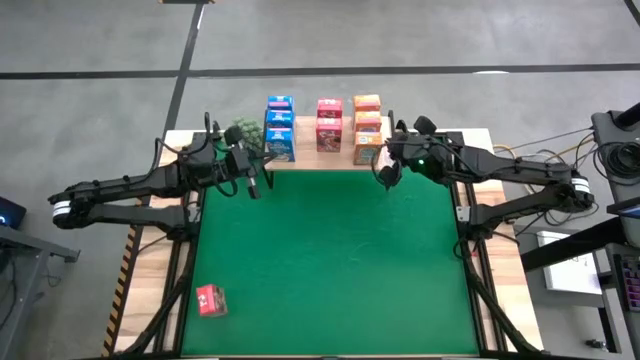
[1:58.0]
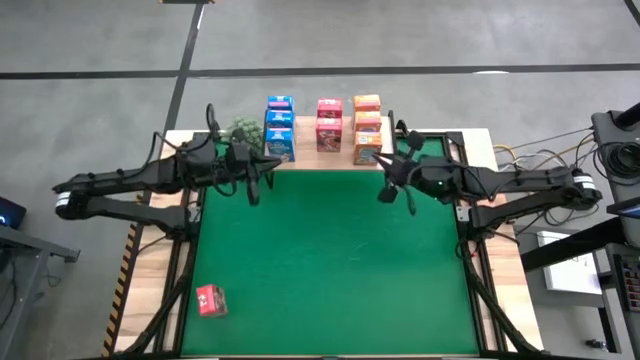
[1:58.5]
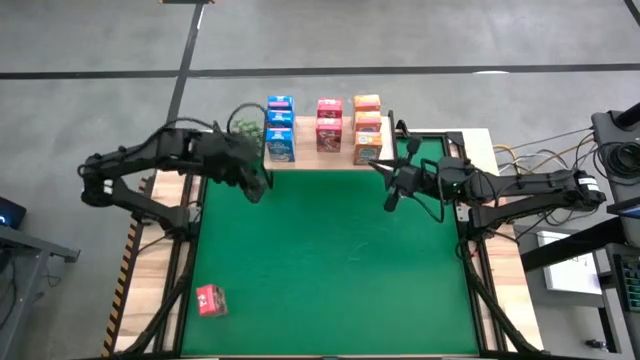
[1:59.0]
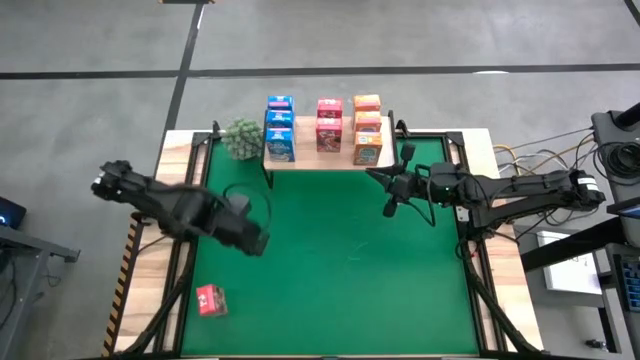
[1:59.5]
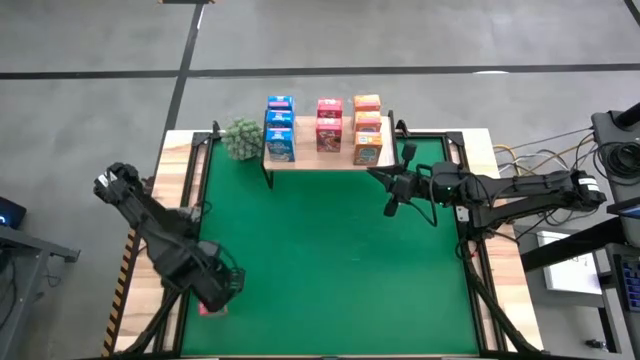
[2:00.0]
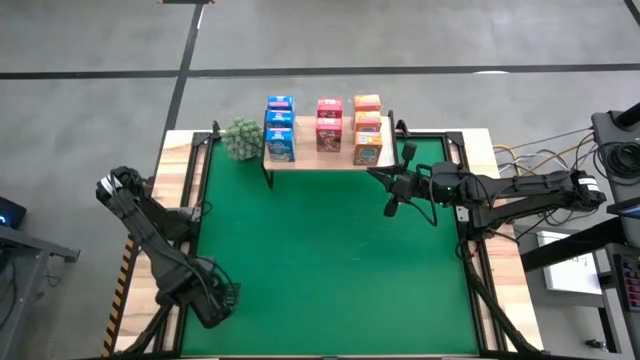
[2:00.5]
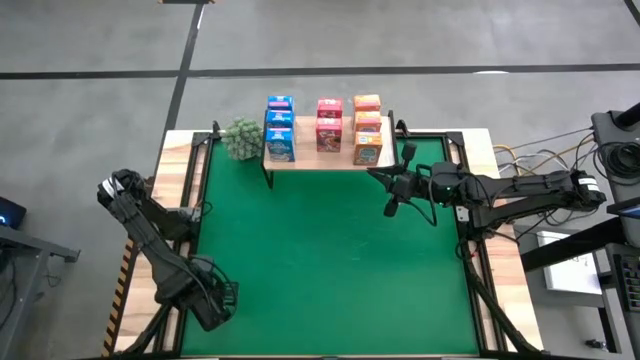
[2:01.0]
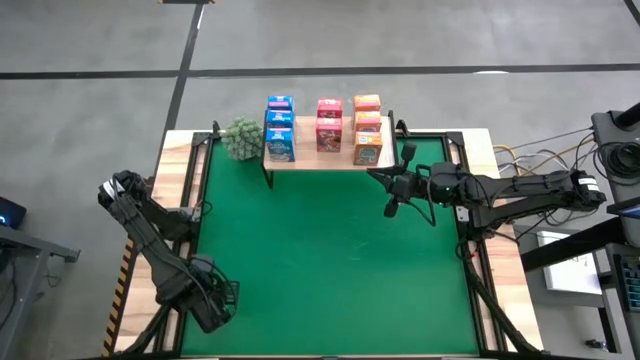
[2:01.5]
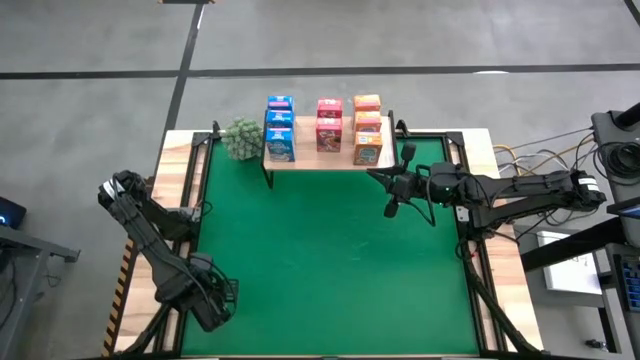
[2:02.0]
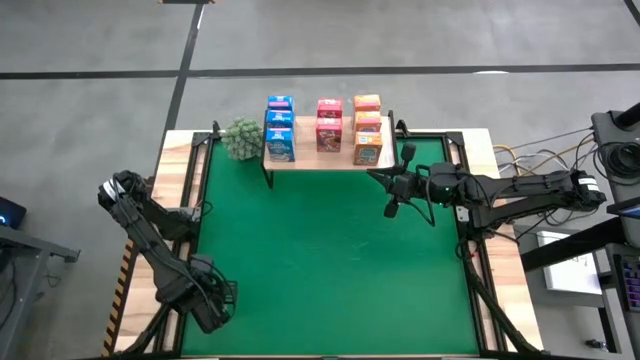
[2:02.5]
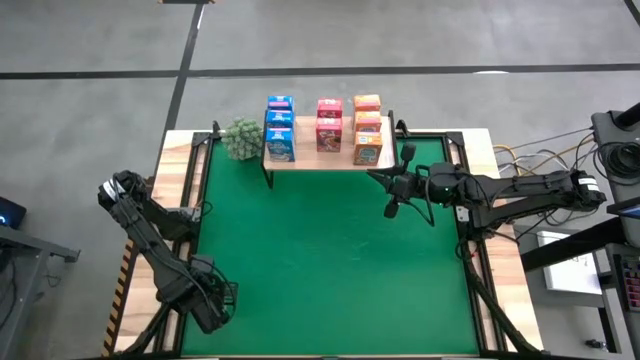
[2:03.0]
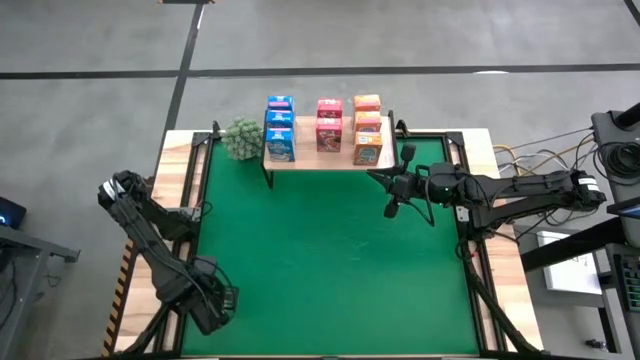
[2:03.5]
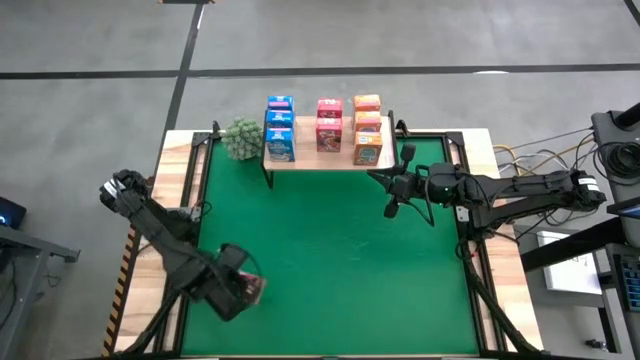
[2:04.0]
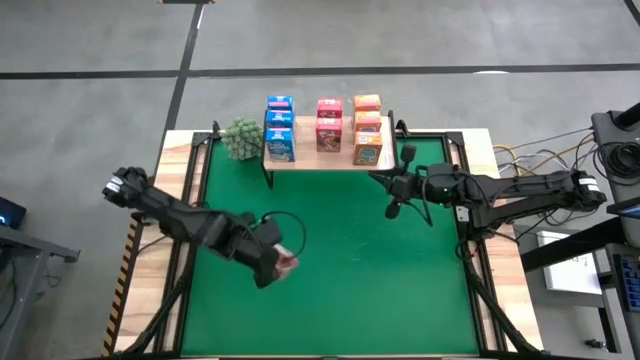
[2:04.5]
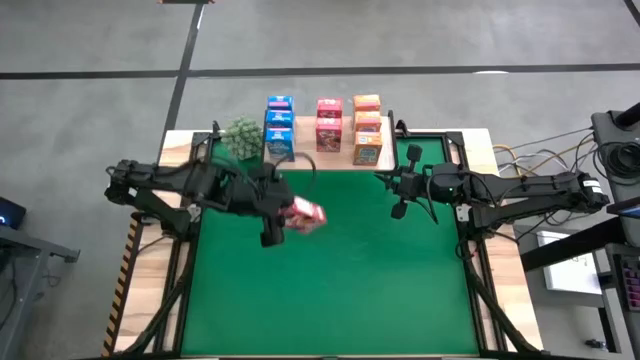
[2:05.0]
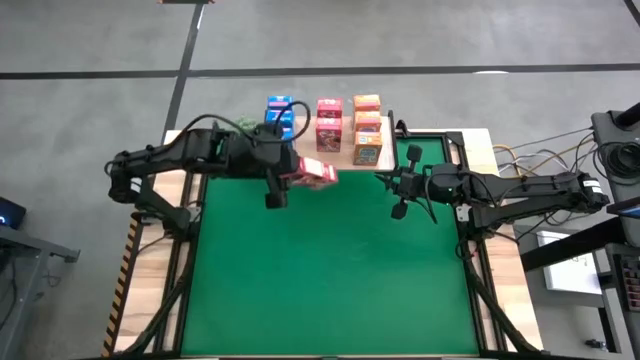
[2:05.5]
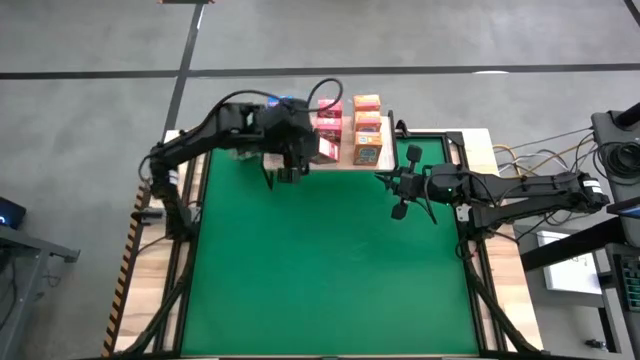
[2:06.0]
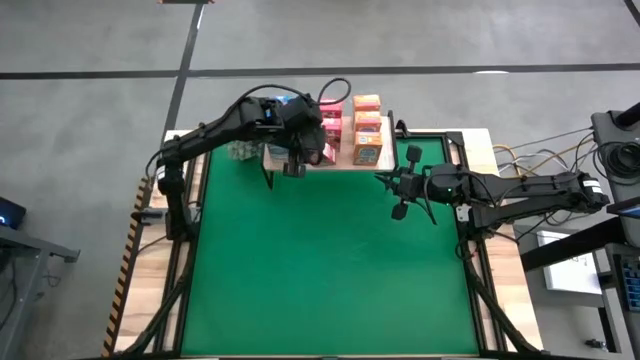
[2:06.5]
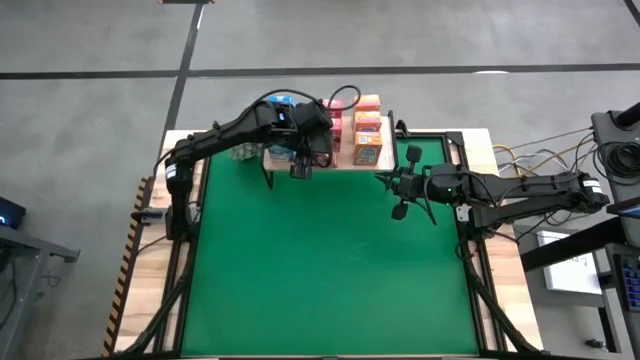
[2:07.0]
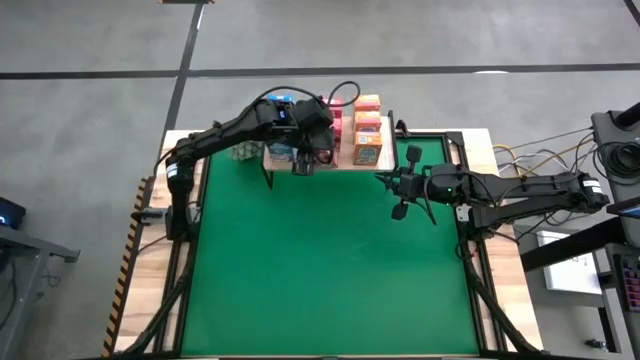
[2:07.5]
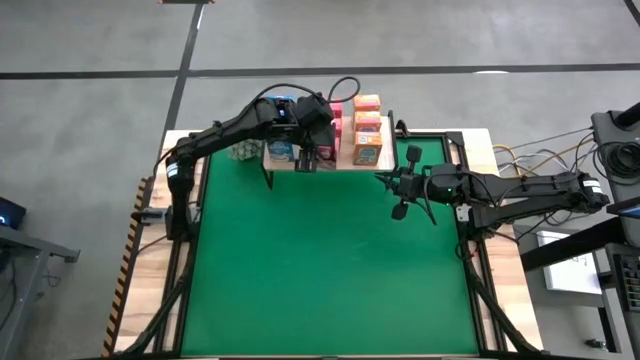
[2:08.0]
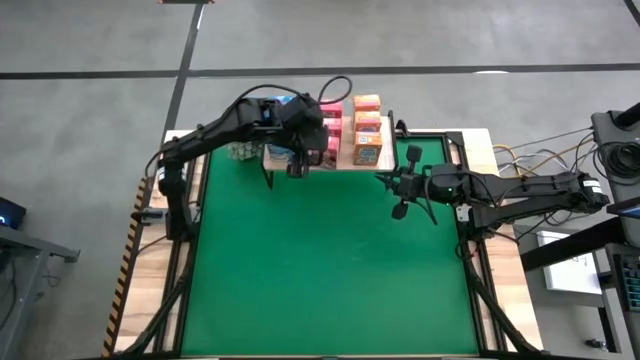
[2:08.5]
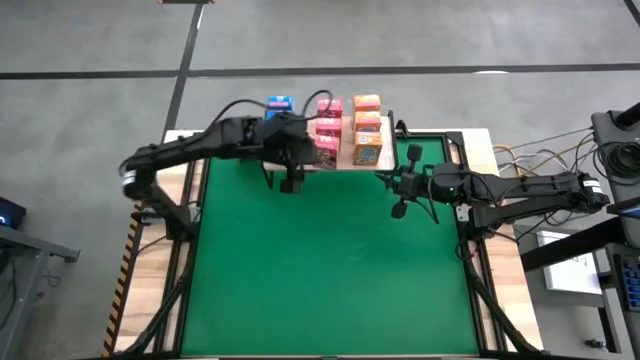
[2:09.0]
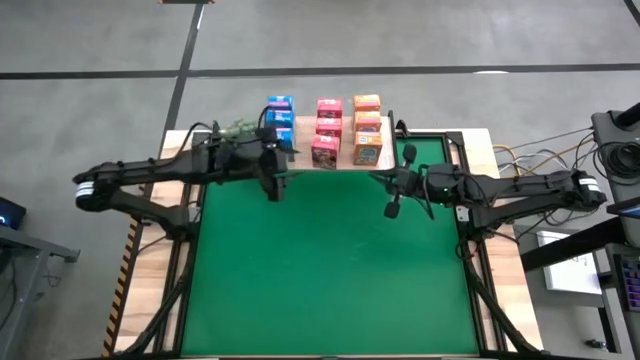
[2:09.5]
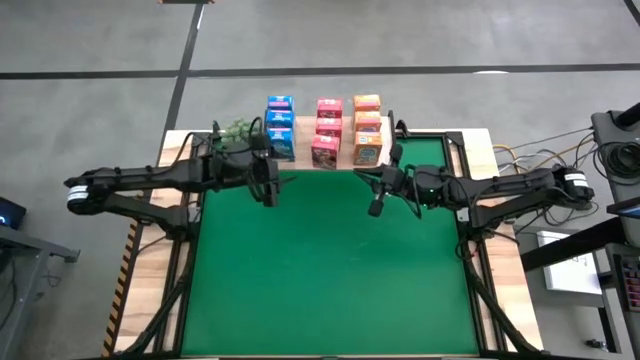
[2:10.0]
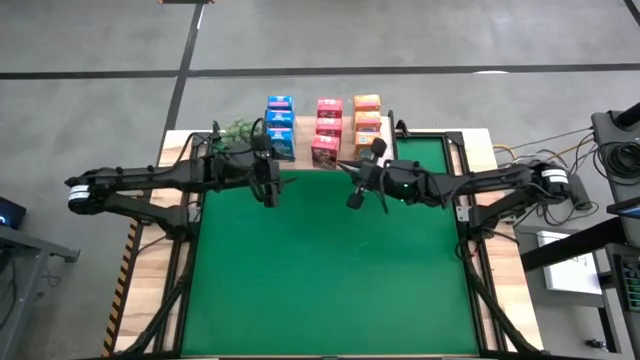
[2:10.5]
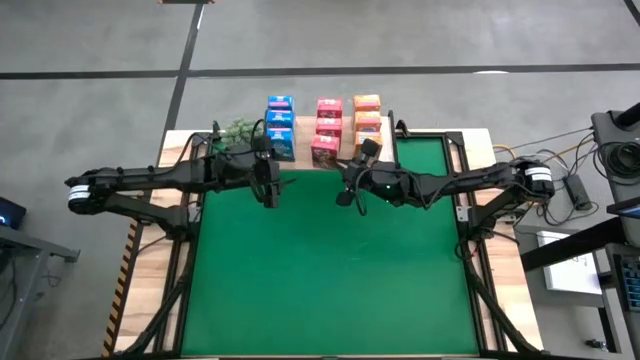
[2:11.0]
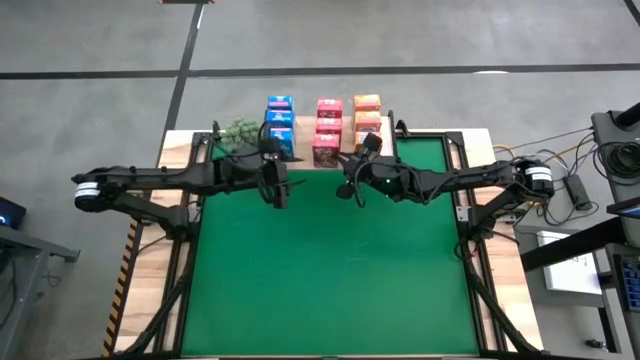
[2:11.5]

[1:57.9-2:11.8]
Task: Stack cereal on shelf
Put the red cereal box on the shelf aligned with the other red cereal boxes

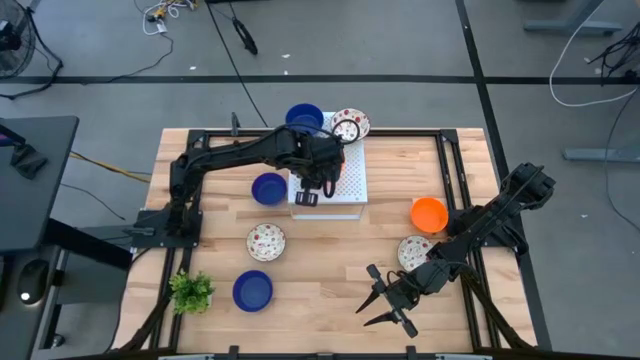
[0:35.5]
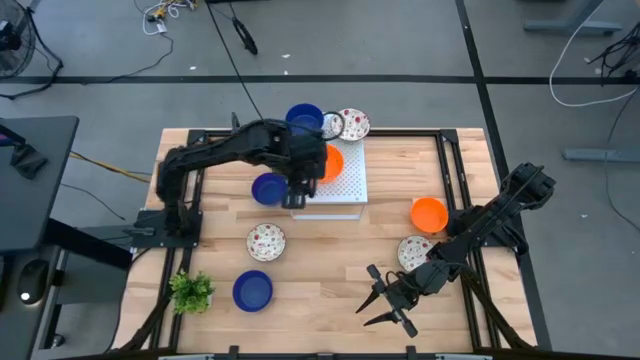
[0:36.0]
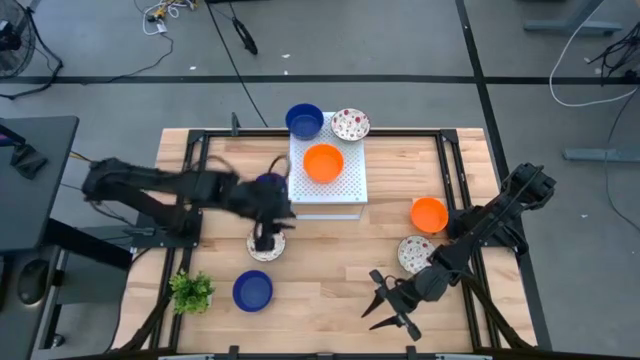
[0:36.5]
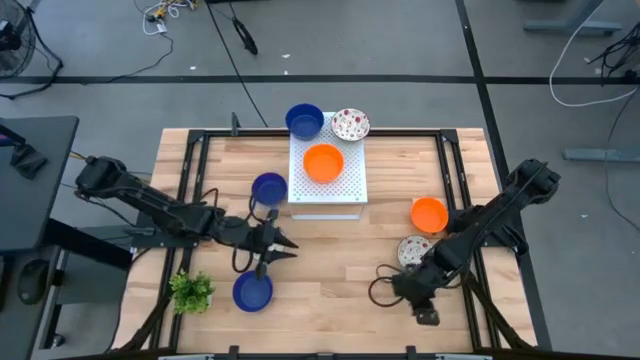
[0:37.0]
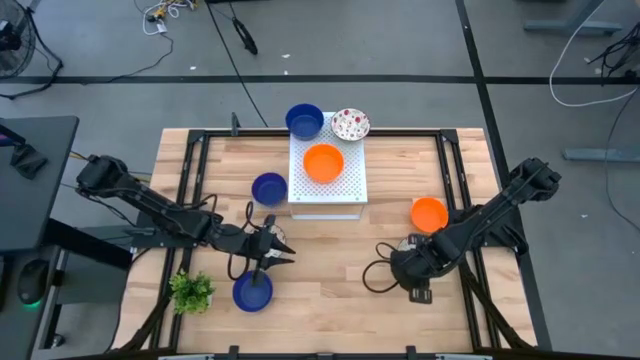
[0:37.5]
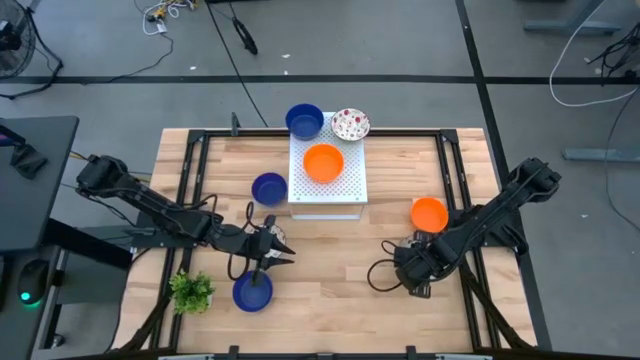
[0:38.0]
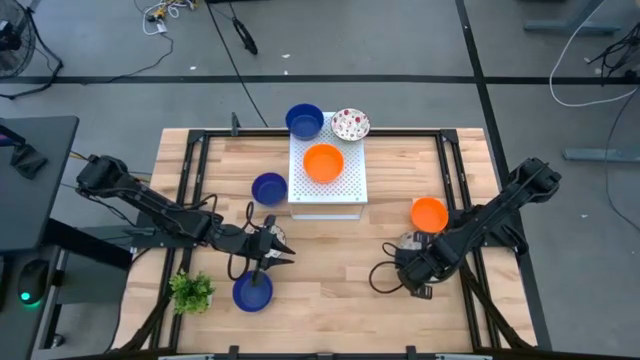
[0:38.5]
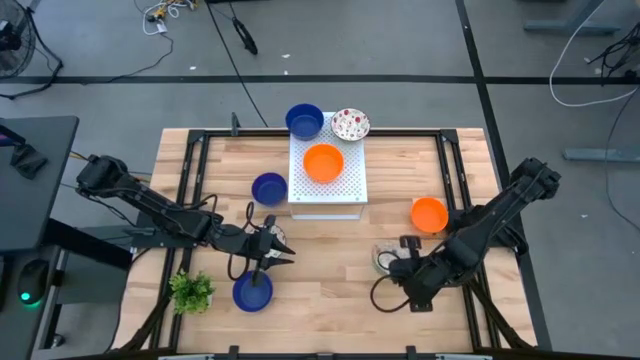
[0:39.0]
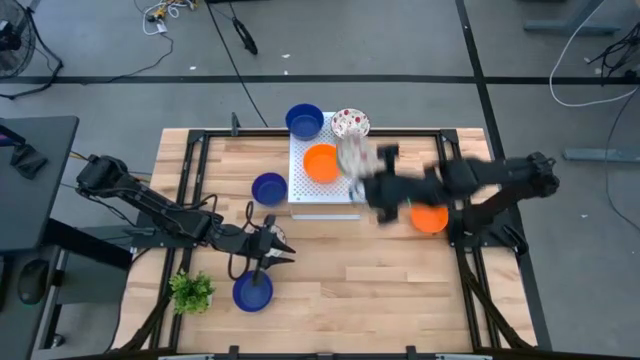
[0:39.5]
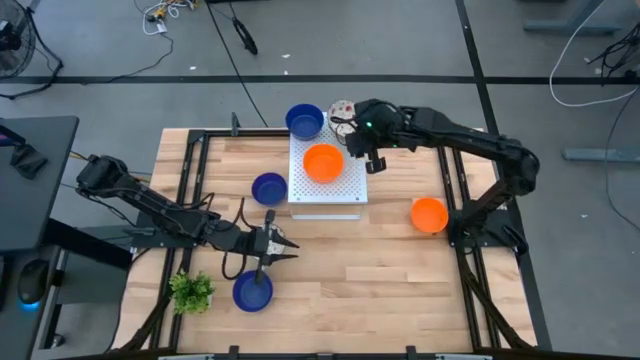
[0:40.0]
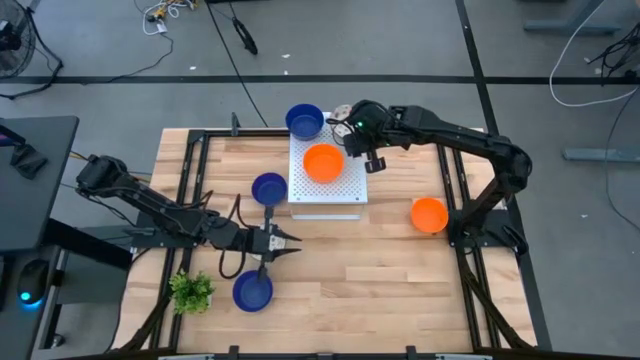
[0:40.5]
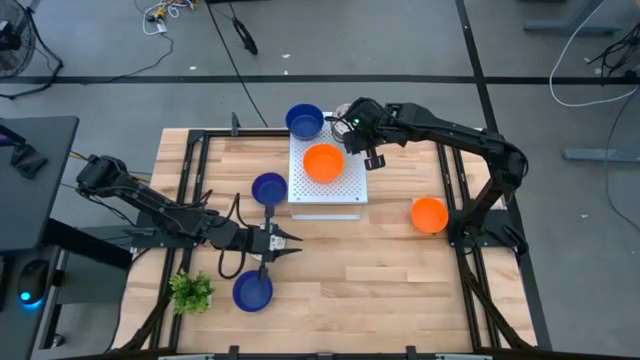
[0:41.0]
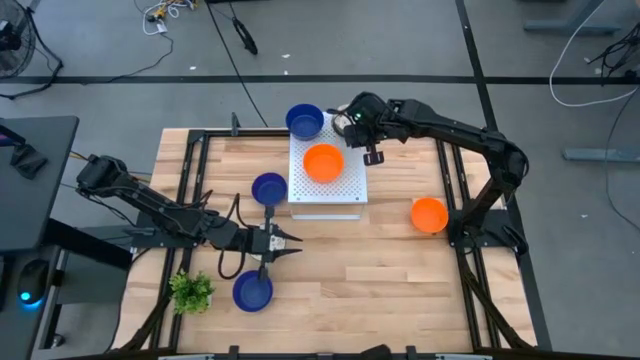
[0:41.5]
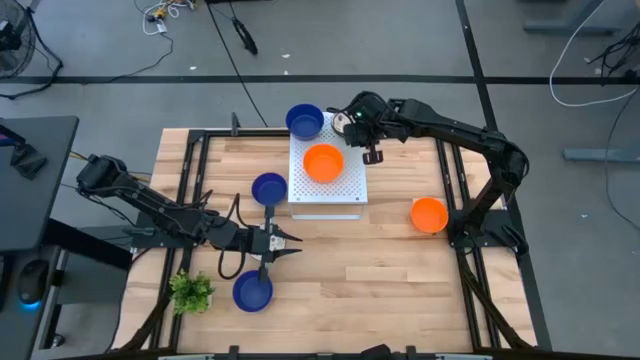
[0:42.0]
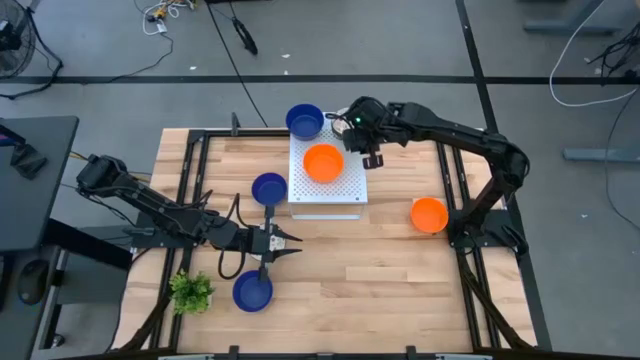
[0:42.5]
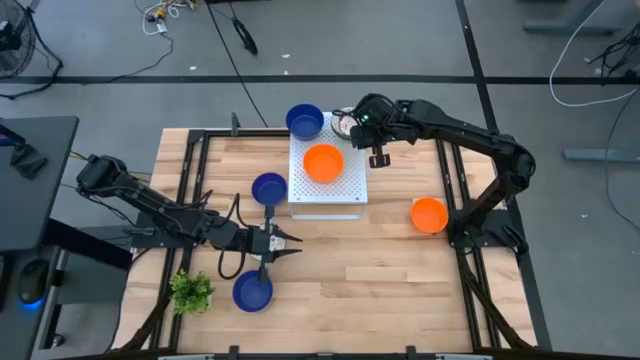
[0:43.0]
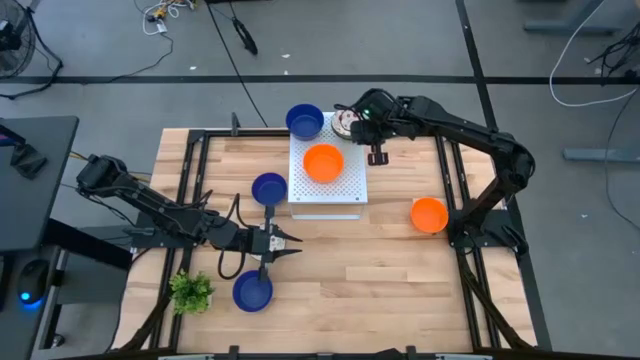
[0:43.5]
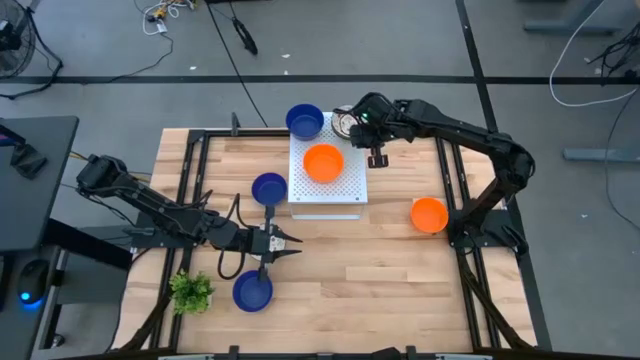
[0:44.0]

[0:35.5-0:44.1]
Task: Pick & Place Mini bowls
Stack the right white patterned bowl on top of the other white patterned bowl on the shelf
